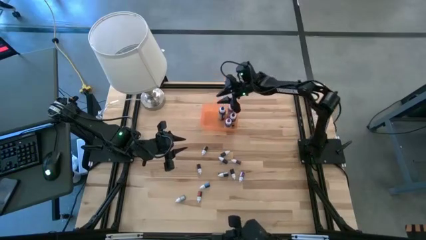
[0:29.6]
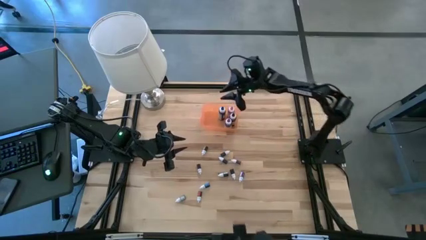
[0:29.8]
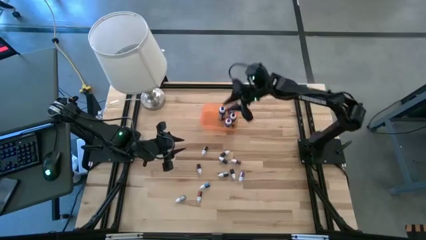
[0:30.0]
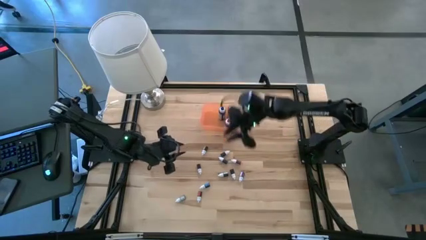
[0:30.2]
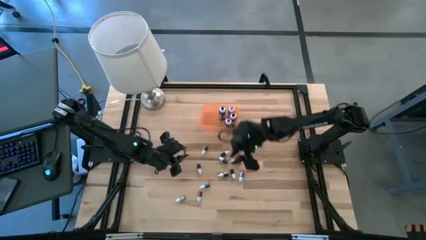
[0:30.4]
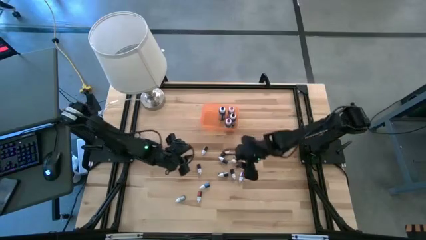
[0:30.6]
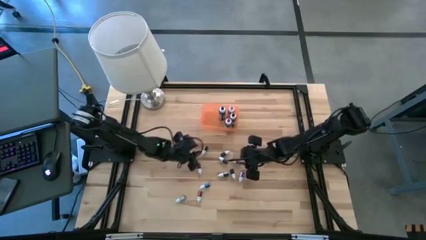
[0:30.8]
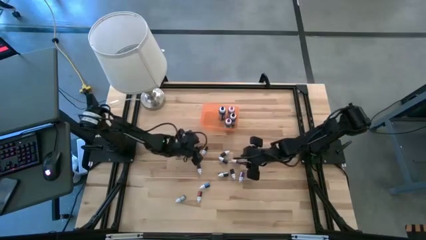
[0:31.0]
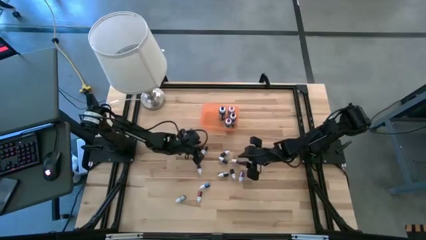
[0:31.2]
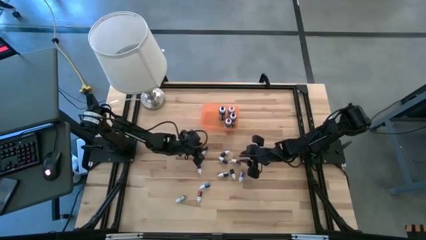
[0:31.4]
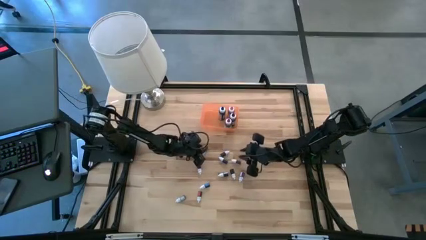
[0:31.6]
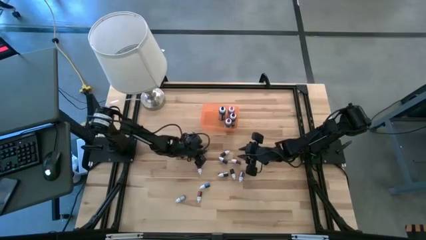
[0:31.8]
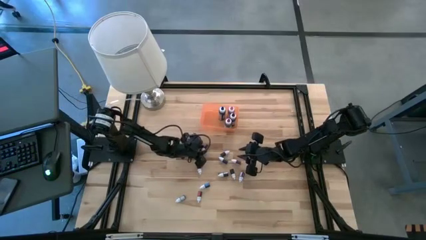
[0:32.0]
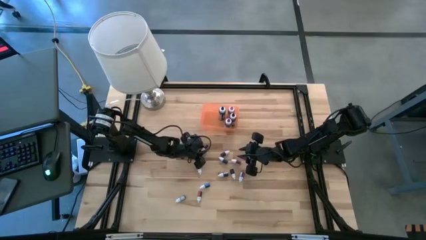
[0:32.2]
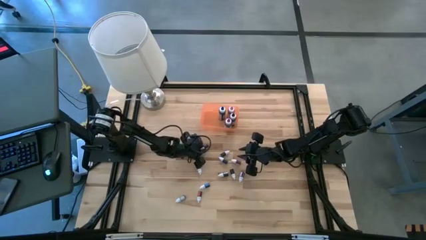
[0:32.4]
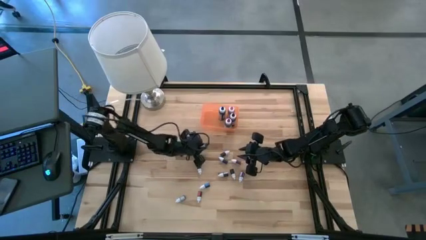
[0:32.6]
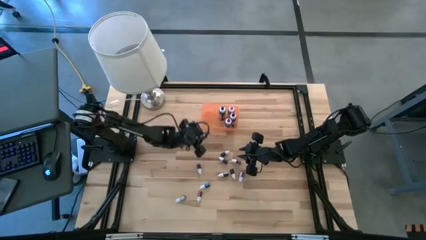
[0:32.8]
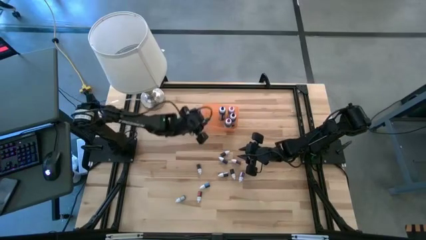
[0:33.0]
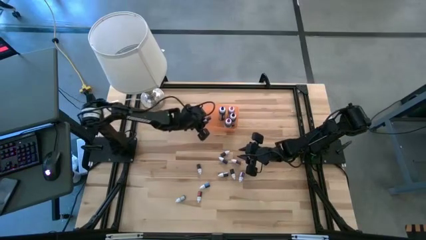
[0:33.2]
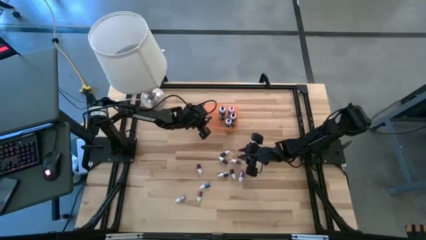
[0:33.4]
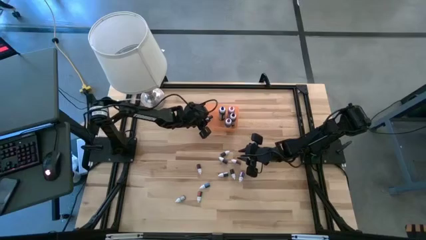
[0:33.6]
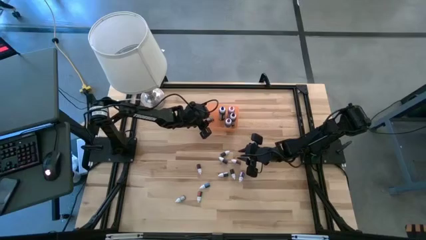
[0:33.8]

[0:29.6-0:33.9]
Task: Pick & Place food coloring
Put the small black food coloring bottle into the bin

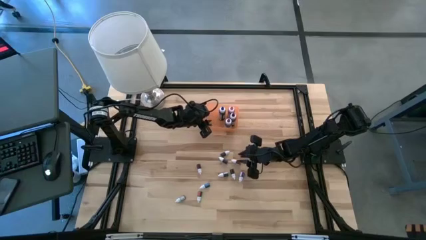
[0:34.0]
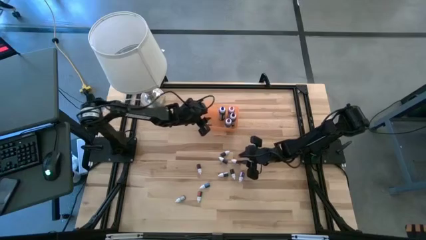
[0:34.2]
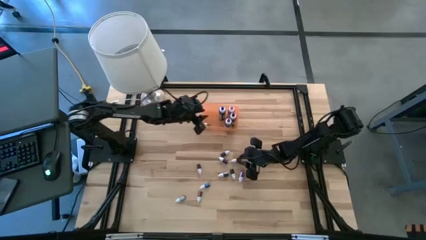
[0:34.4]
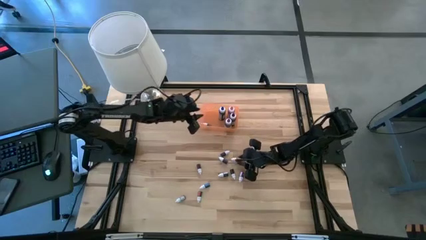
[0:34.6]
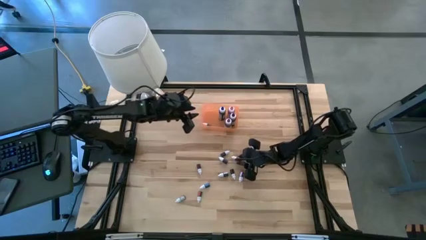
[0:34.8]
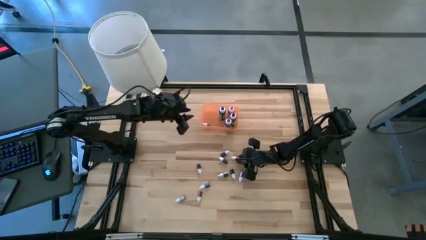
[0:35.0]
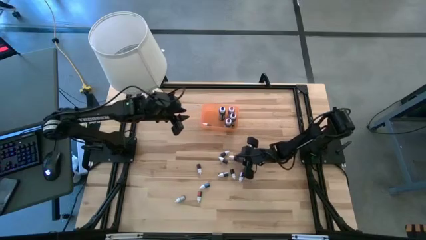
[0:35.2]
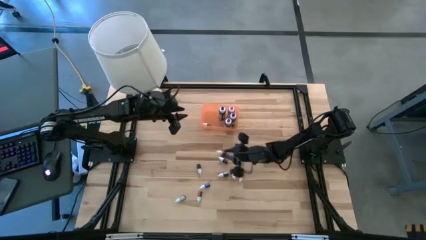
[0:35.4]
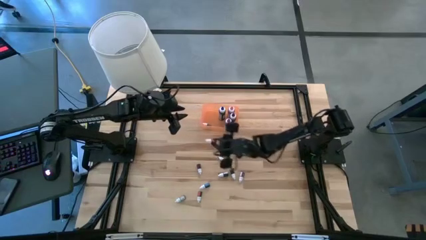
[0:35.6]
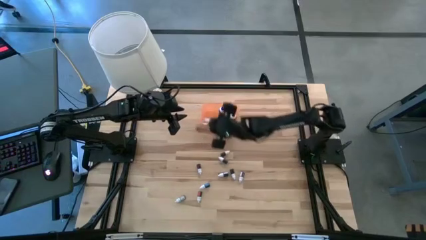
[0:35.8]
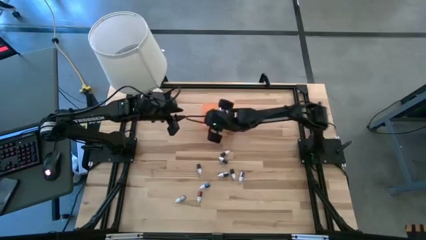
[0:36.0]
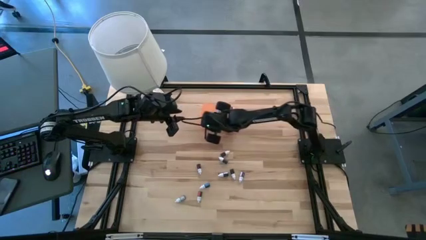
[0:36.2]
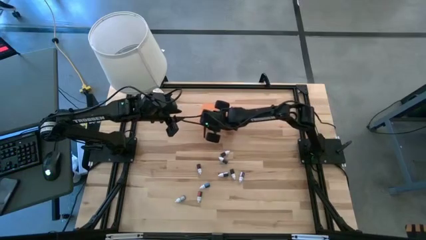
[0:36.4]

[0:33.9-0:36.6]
Put the small orange food coloring bottle into the bin

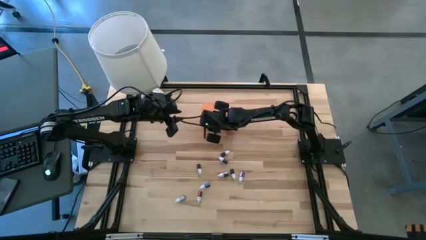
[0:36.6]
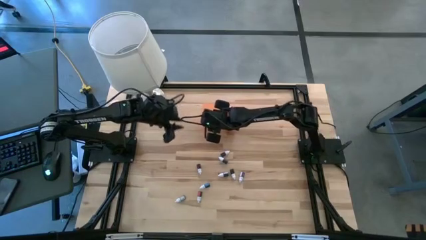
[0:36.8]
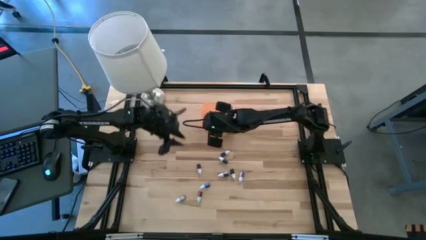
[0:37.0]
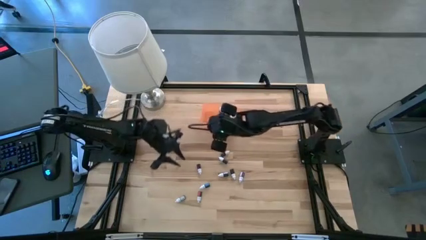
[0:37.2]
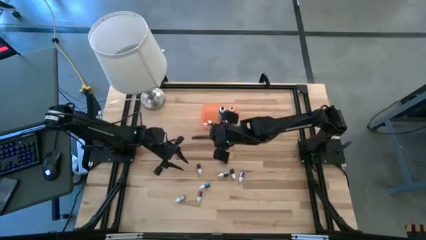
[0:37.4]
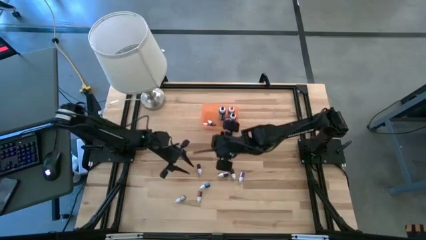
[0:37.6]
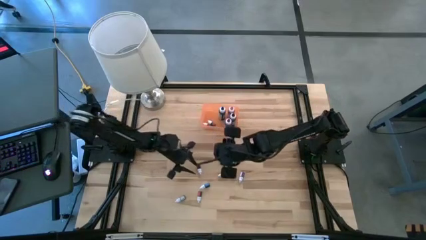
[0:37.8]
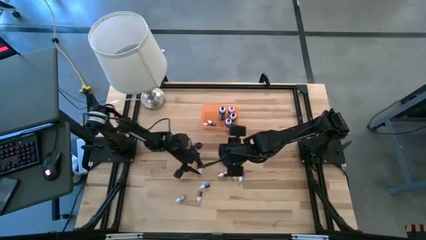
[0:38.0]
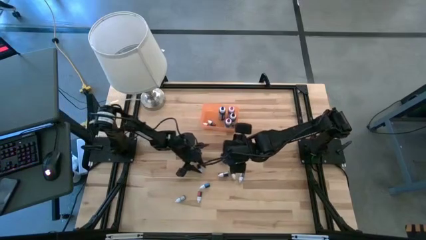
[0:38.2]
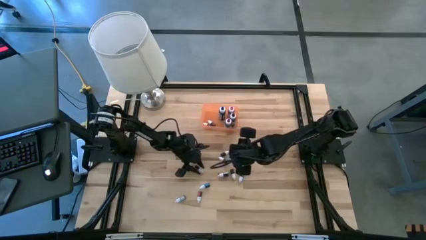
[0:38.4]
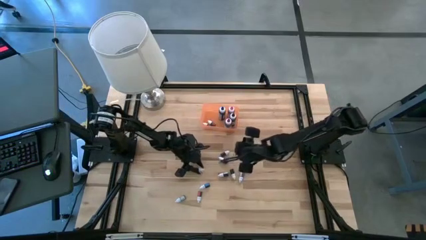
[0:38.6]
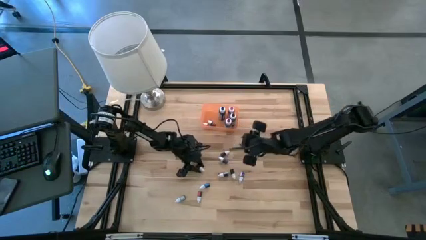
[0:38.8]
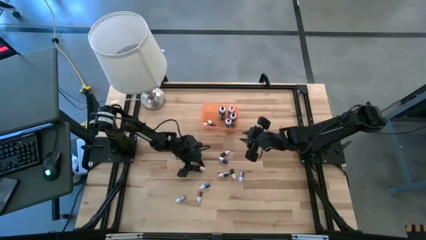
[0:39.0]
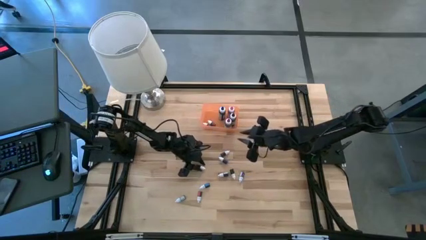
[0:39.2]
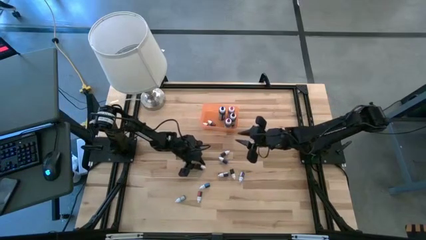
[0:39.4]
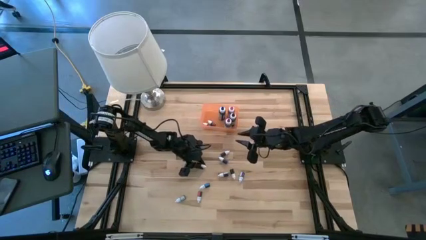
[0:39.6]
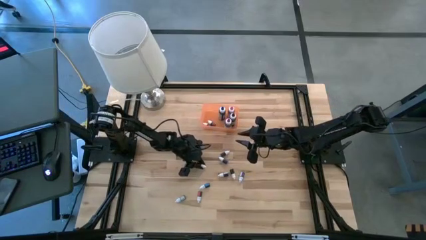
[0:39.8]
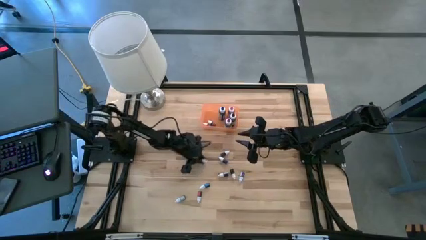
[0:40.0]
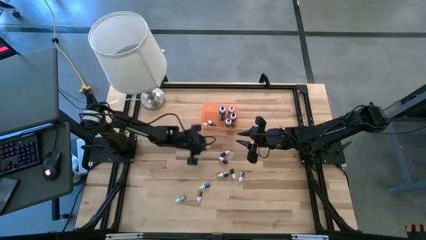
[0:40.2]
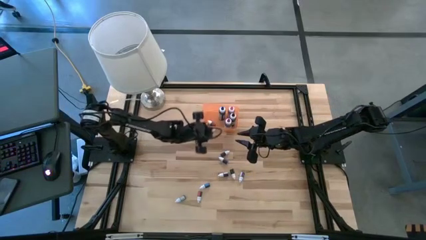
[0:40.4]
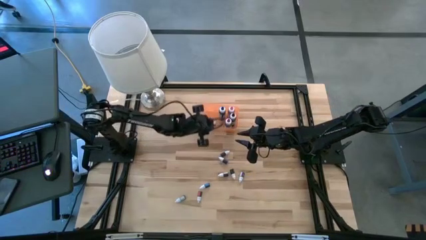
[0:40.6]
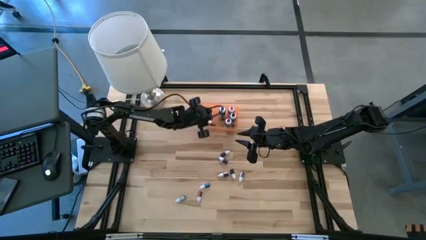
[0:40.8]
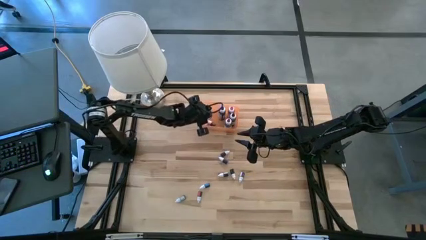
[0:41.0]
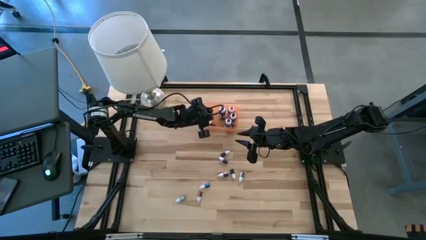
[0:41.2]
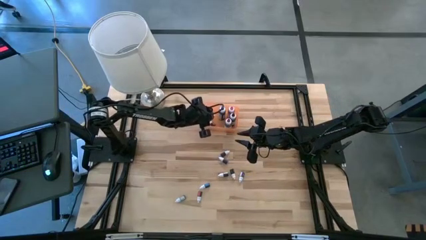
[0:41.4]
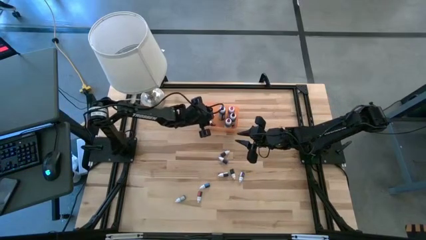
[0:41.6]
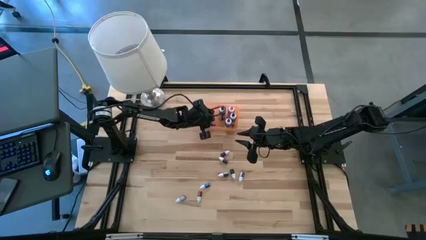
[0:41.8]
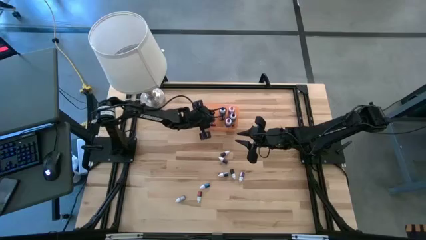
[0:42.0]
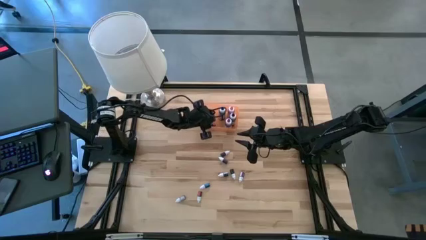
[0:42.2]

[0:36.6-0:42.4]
Put the small red food coloring bottle into the bin

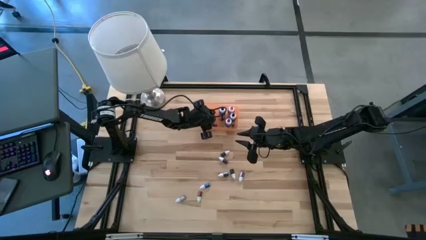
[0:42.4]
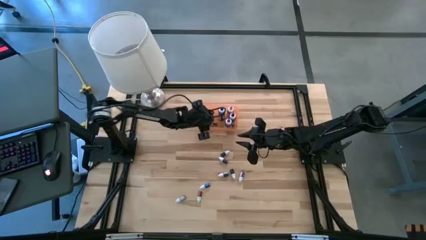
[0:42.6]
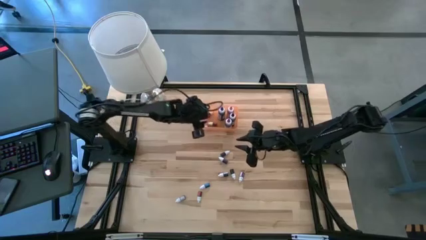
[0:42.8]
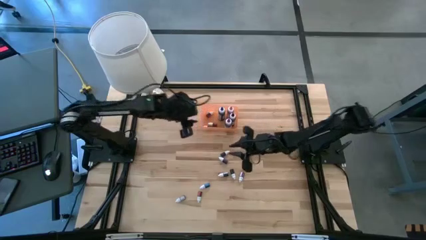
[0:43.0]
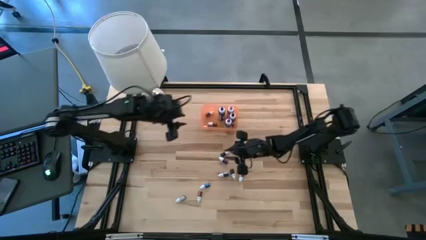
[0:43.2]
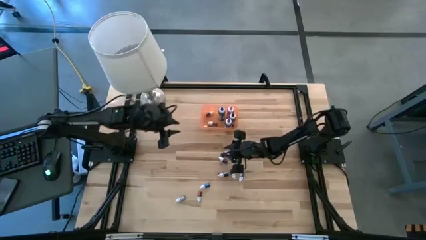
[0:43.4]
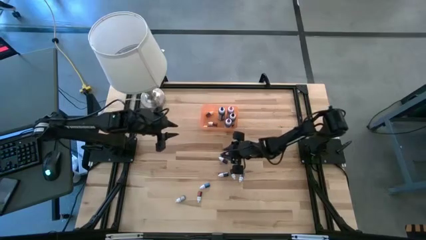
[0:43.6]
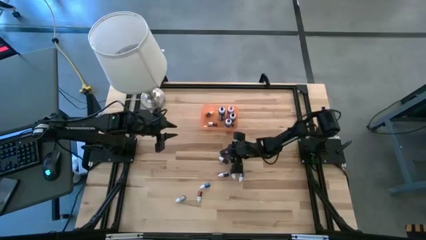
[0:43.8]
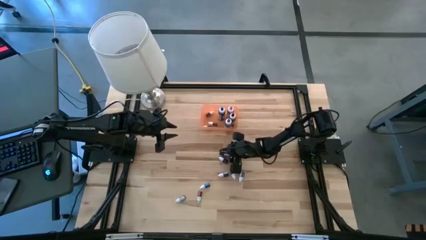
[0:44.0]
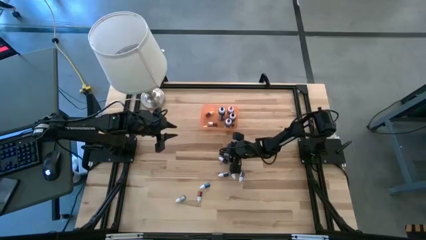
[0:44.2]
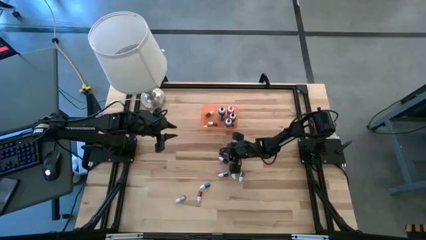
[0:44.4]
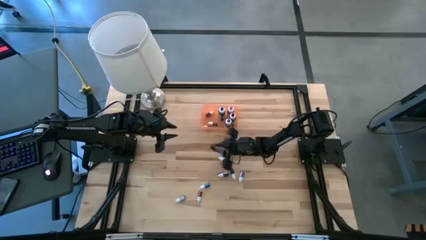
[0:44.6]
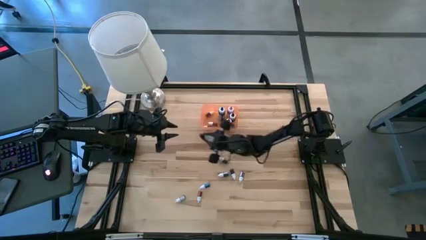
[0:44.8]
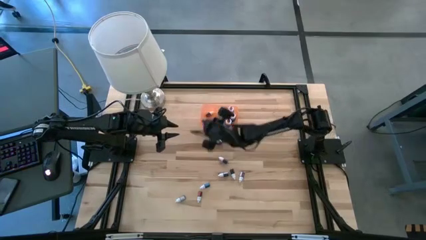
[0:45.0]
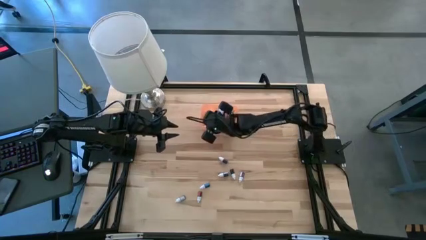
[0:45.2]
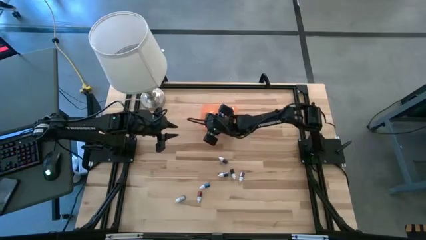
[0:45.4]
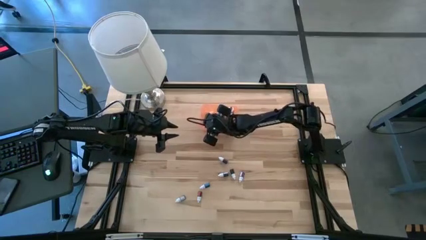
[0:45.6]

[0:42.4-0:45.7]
Put the small black food coloring bottle into the bin

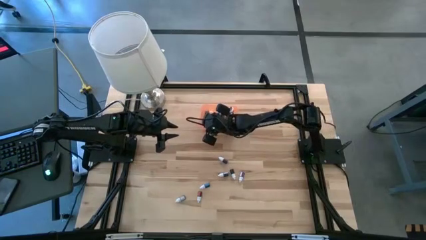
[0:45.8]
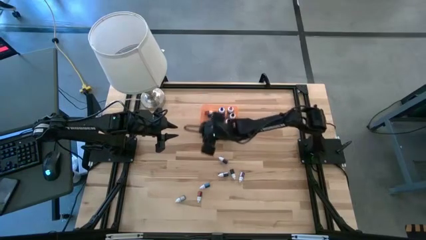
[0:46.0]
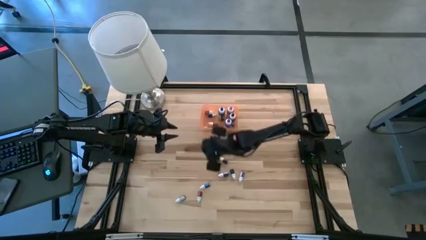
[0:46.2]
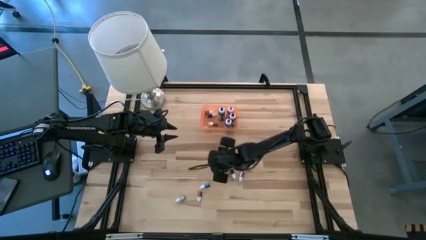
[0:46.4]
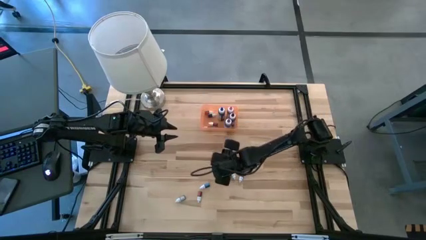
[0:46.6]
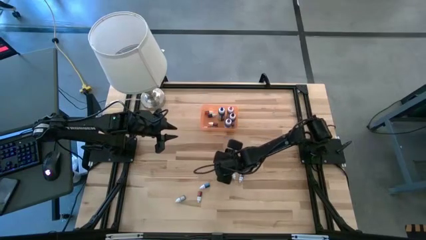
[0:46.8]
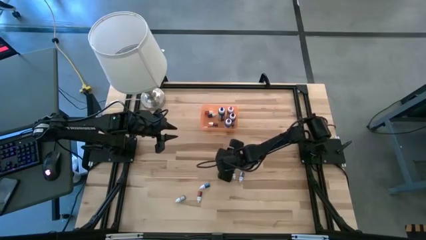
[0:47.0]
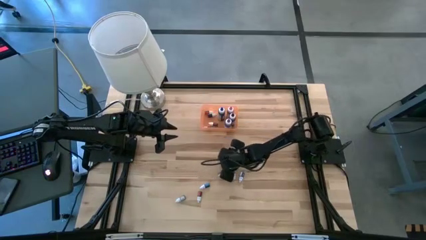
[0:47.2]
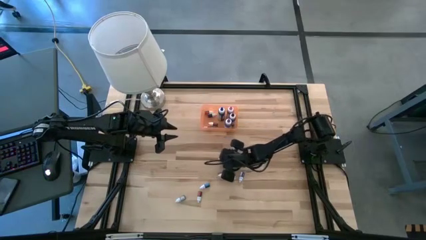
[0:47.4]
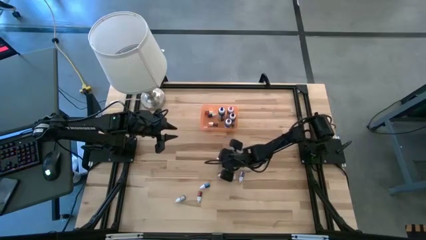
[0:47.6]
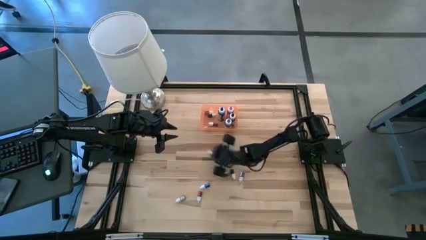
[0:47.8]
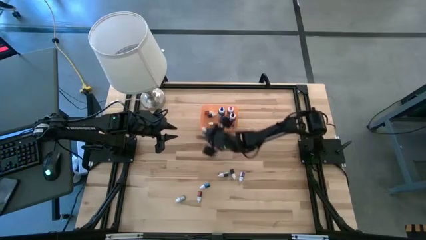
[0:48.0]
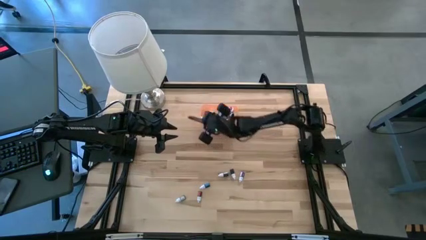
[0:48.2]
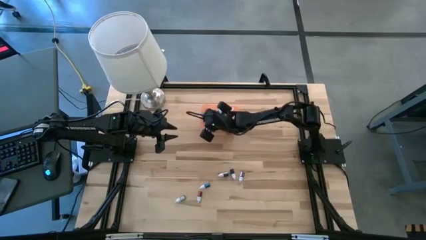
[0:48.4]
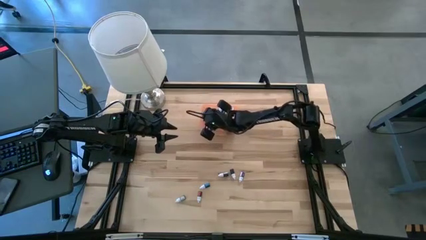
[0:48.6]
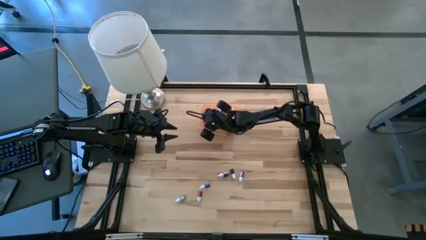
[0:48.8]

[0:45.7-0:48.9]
Put the small purple food coloring bottle into the bin
